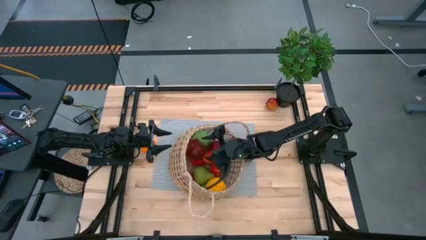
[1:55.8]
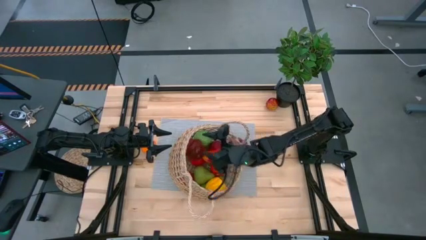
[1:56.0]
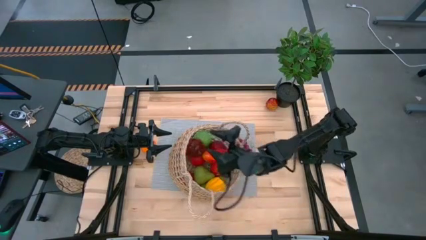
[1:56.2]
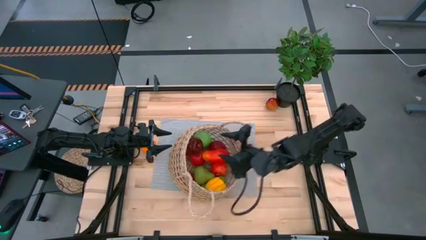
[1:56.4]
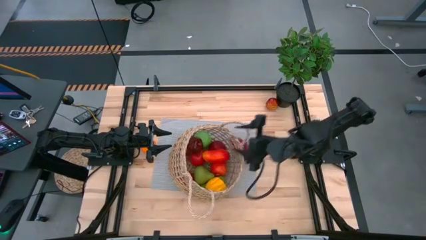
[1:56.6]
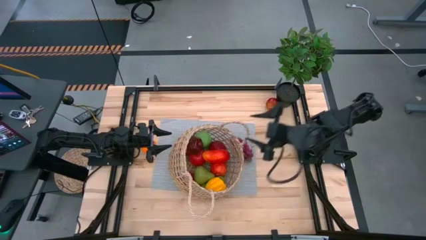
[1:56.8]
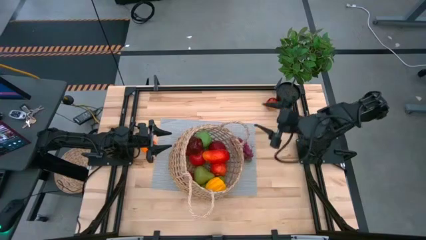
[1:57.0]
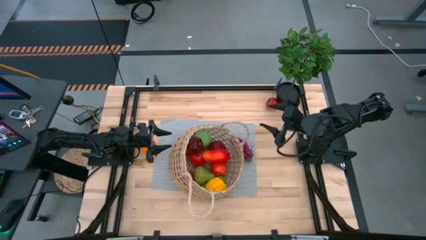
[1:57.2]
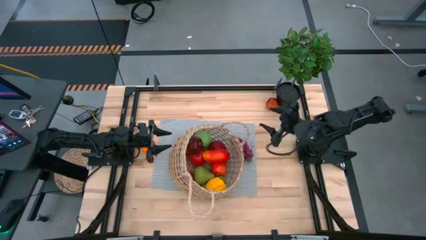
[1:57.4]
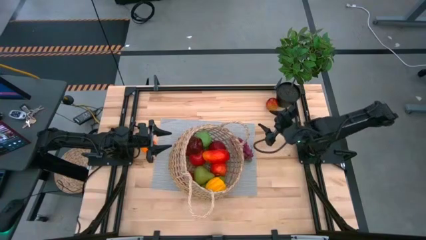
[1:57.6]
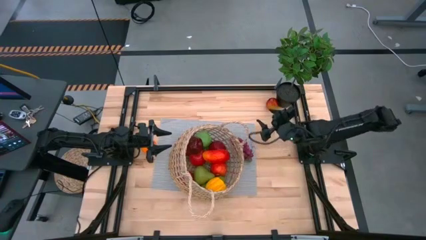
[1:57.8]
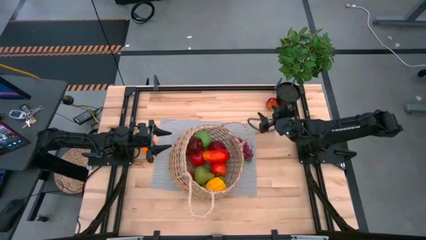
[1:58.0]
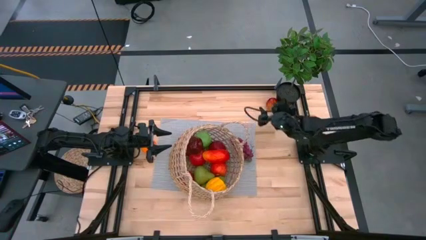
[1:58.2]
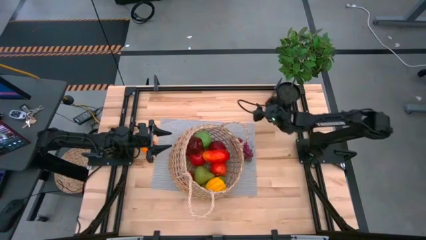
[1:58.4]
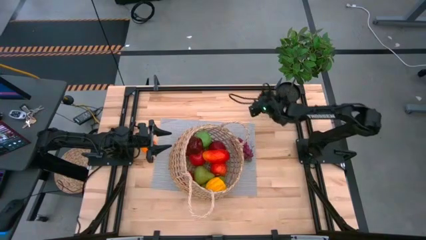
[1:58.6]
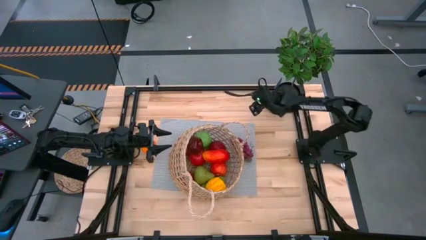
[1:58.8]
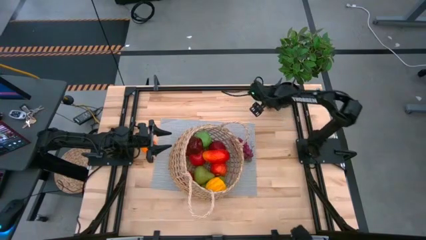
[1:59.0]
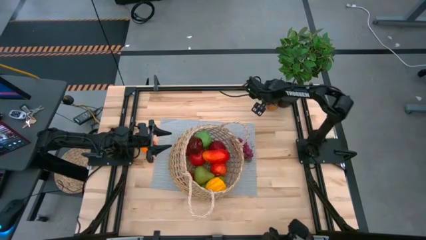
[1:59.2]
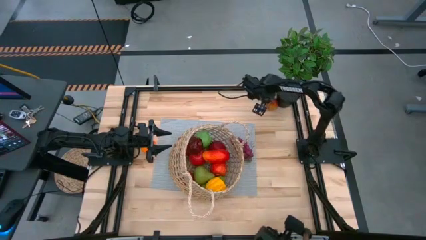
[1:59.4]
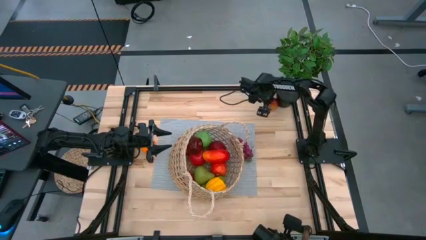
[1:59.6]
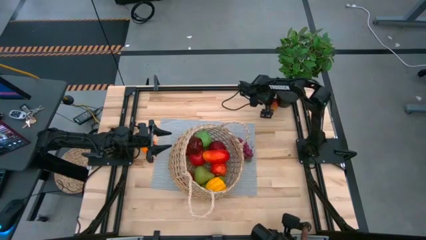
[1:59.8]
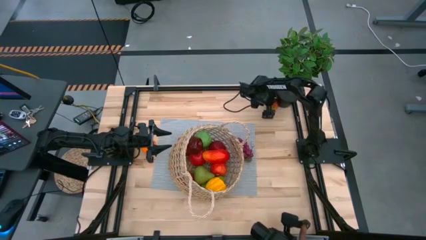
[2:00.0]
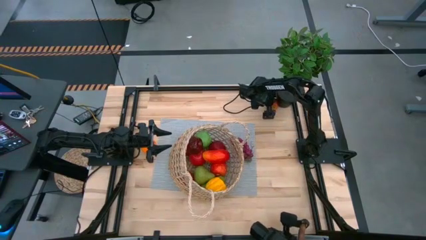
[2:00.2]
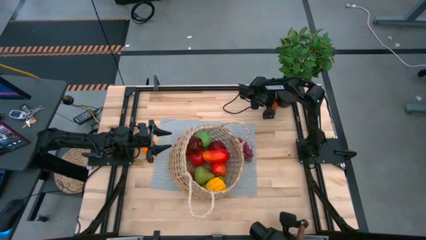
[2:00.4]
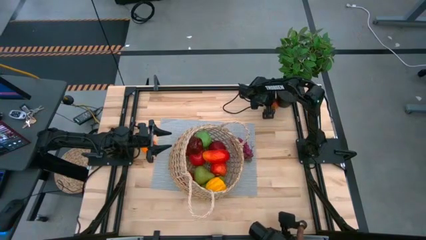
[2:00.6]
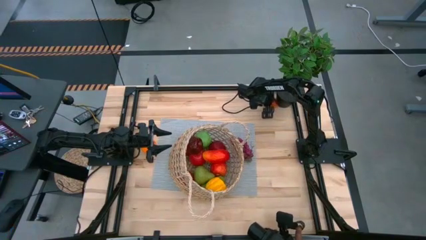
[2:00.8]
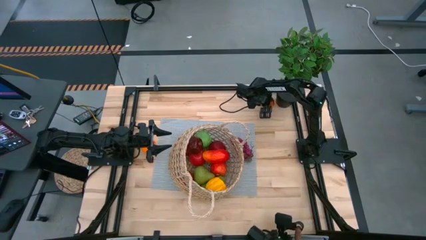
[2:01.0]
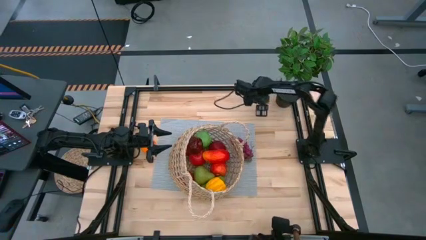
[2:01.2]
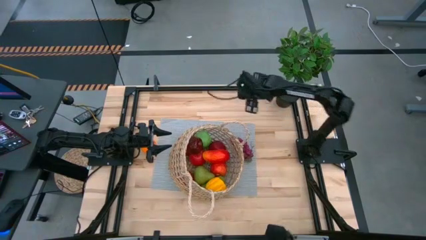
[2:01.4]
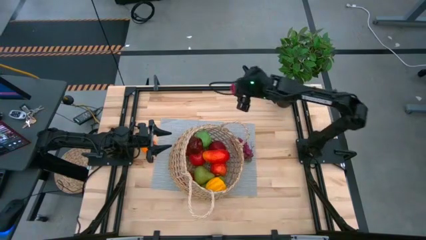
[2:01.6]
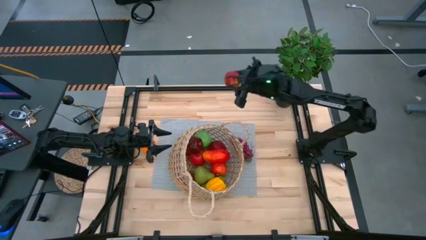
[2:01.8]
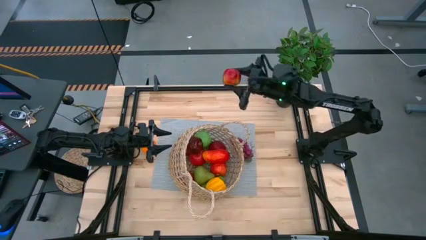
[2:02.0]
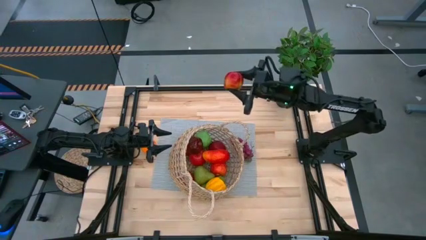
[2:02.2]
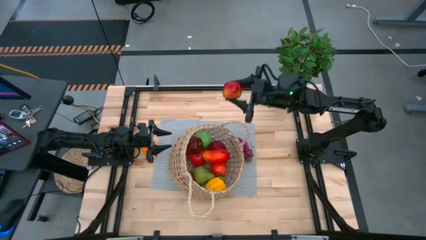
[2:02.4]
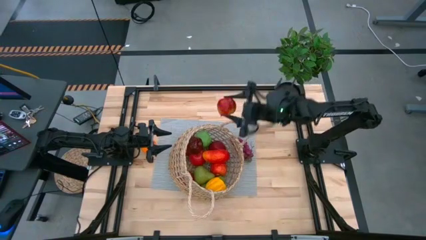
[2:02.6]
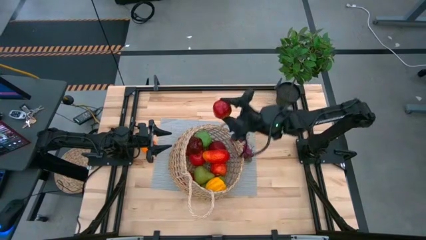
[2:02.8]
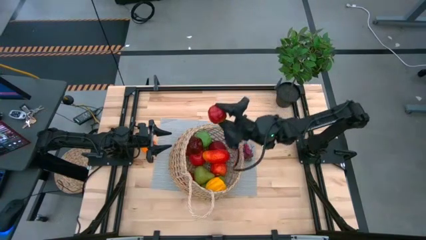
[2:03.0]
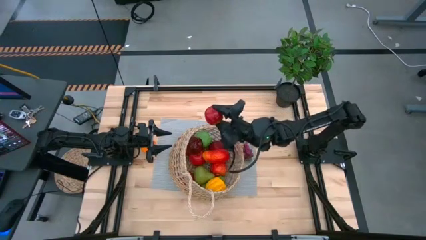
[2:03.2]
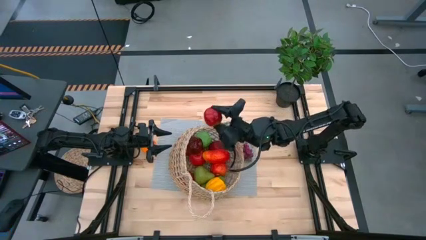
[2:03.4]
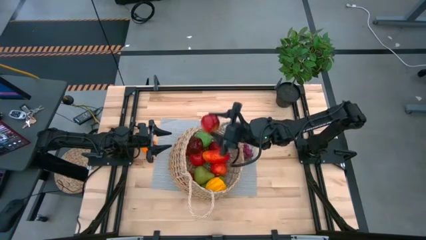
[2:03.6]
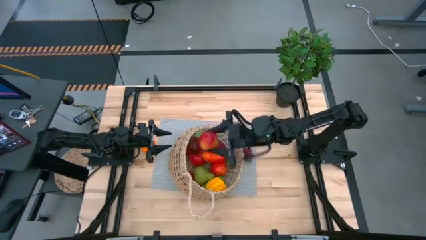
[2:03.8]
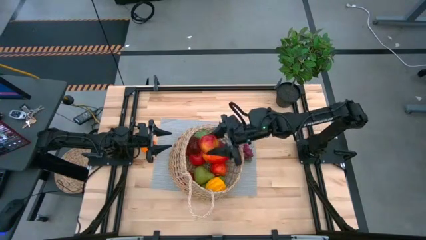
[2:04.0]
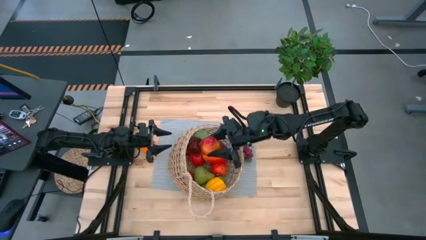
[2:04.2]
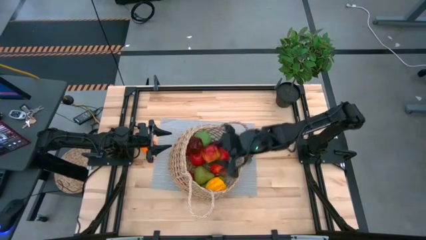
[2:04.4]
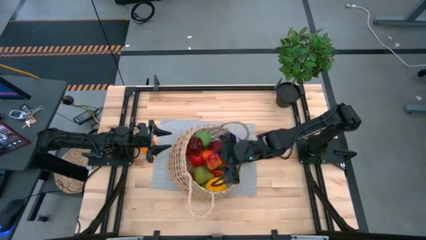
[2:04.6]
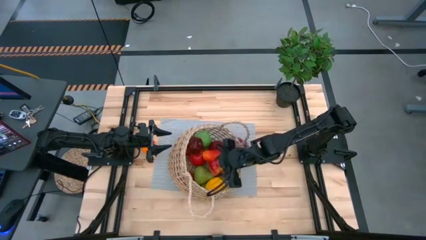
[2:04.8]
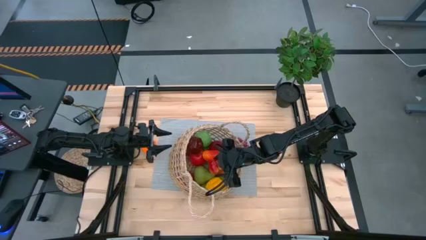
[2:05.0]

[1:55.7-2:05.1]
Task: Build produce basket
Put the apple into the basket

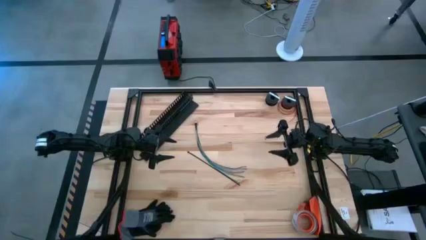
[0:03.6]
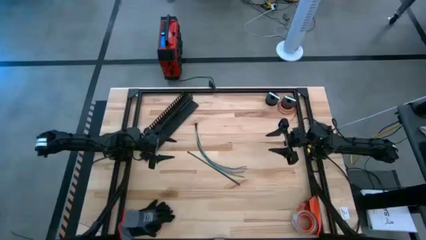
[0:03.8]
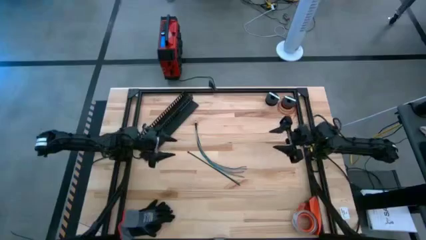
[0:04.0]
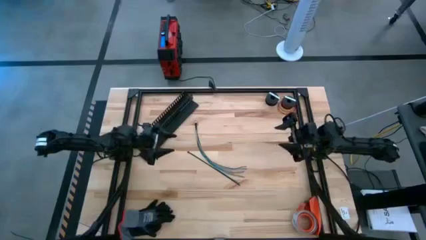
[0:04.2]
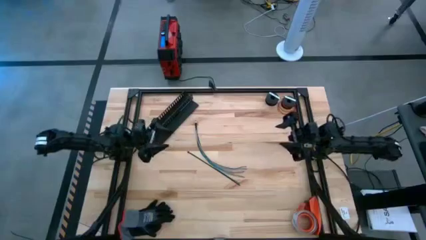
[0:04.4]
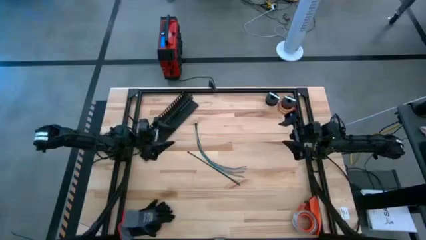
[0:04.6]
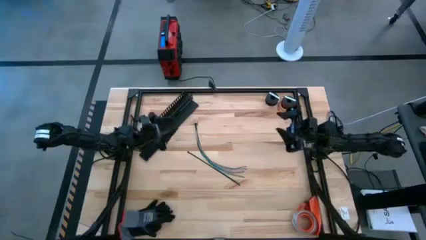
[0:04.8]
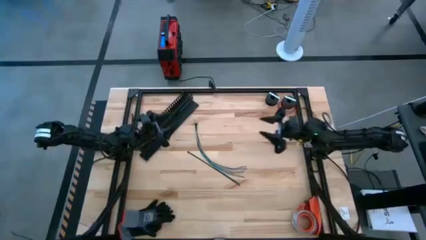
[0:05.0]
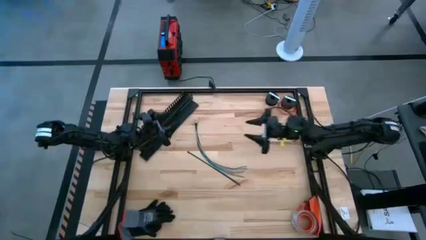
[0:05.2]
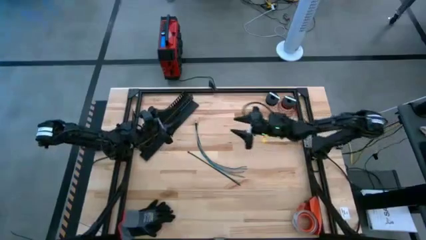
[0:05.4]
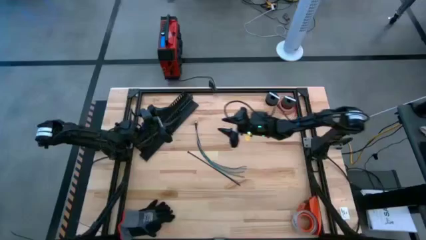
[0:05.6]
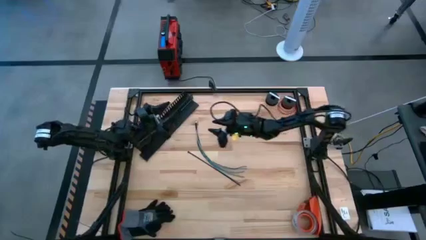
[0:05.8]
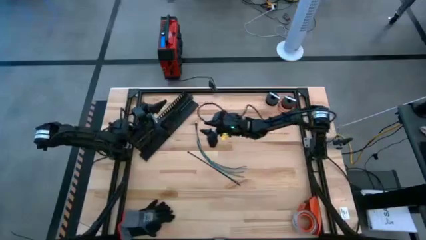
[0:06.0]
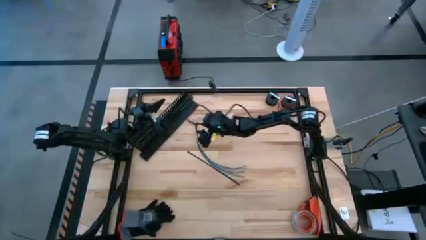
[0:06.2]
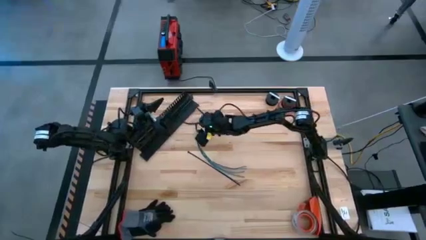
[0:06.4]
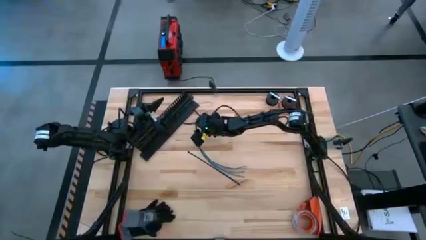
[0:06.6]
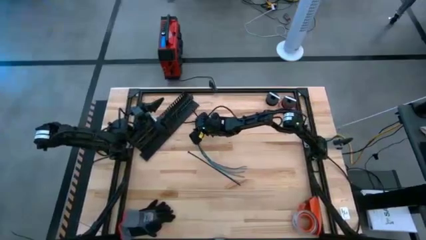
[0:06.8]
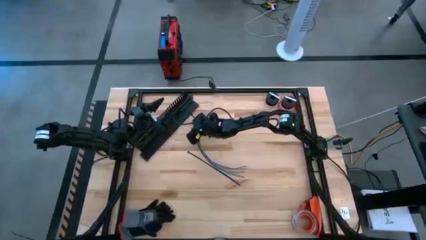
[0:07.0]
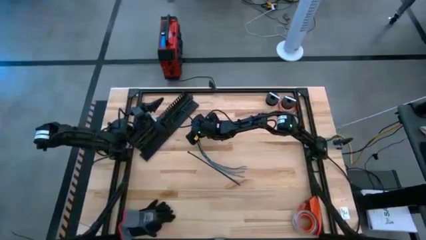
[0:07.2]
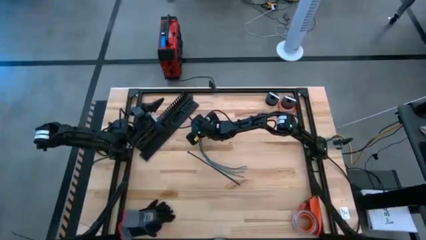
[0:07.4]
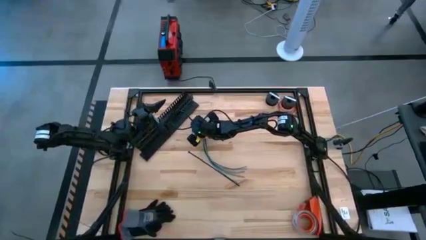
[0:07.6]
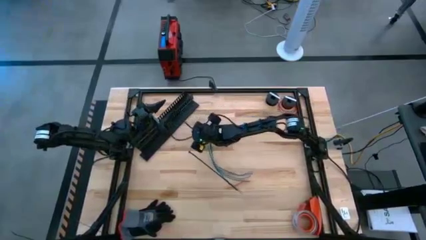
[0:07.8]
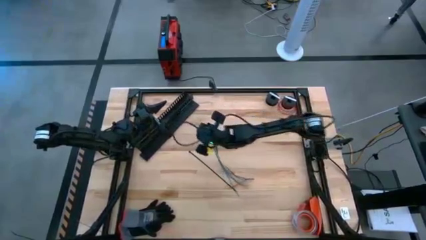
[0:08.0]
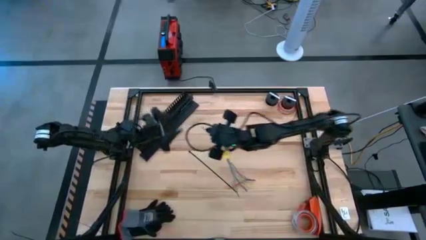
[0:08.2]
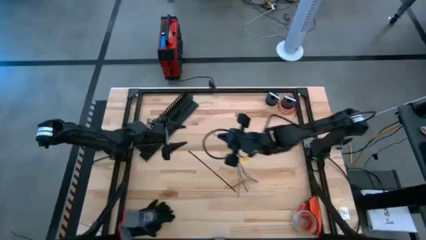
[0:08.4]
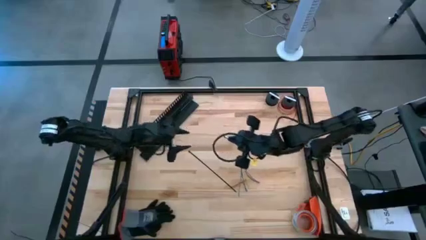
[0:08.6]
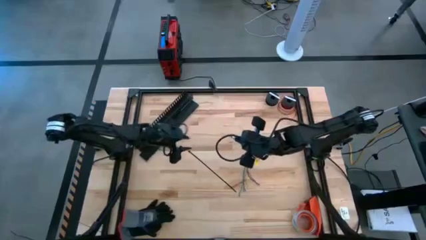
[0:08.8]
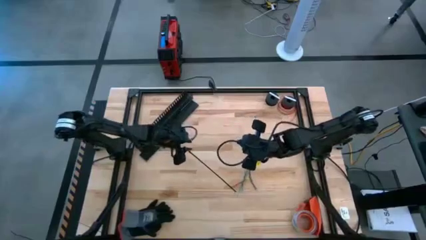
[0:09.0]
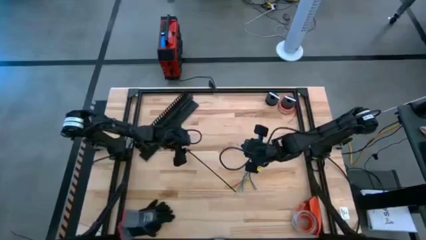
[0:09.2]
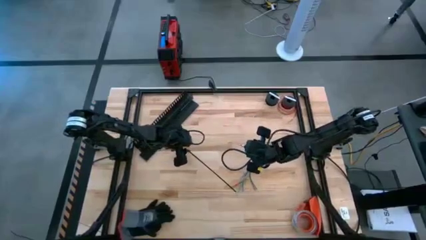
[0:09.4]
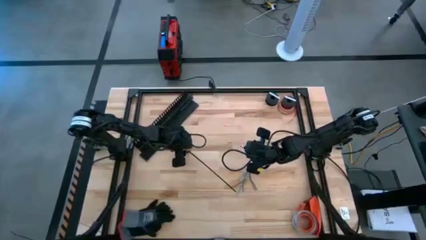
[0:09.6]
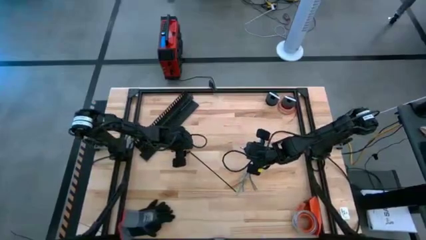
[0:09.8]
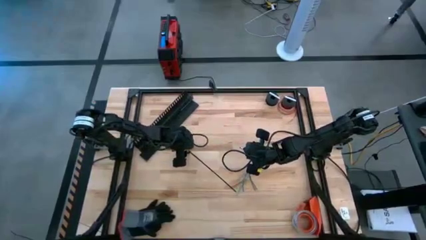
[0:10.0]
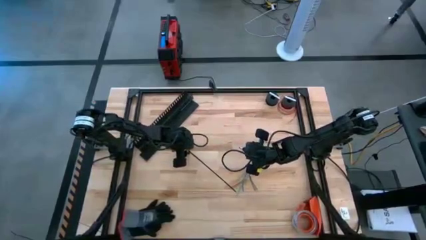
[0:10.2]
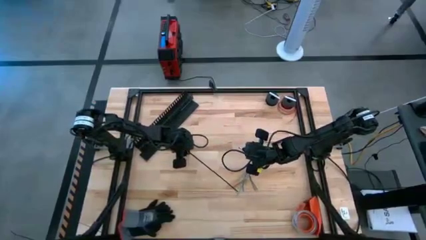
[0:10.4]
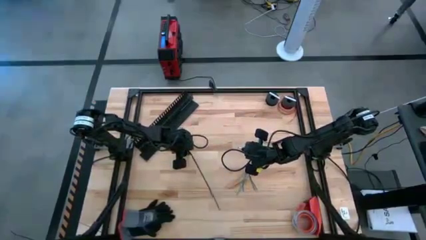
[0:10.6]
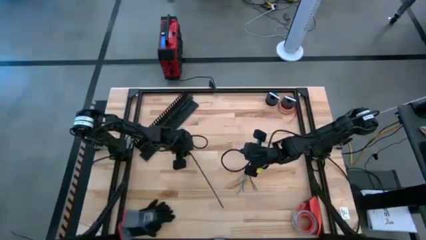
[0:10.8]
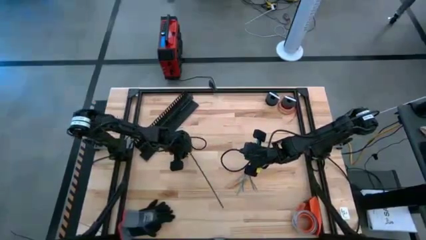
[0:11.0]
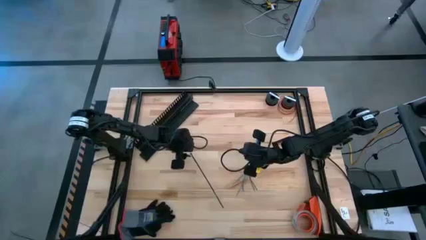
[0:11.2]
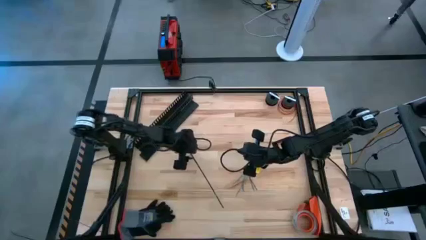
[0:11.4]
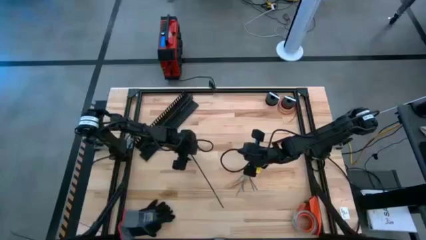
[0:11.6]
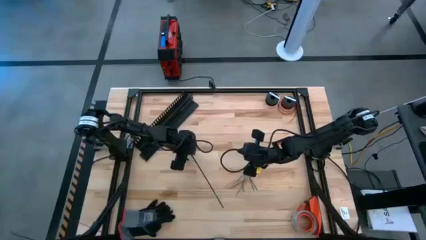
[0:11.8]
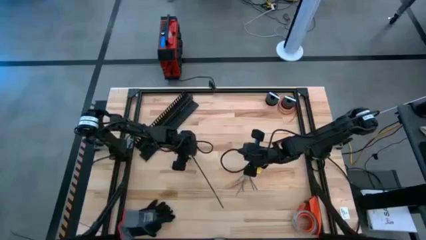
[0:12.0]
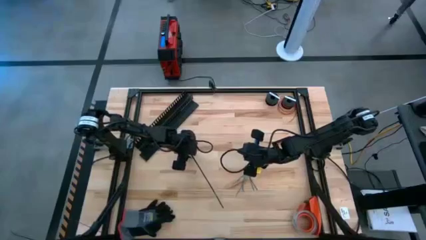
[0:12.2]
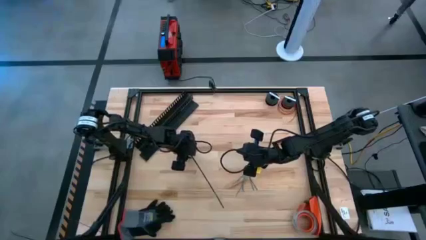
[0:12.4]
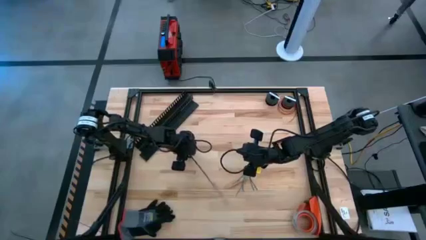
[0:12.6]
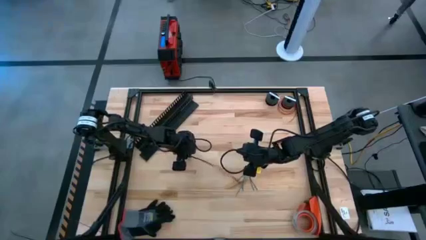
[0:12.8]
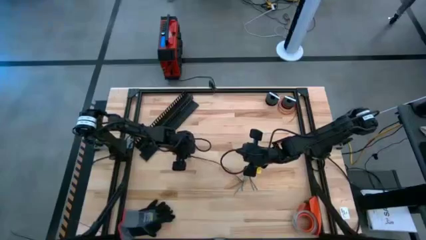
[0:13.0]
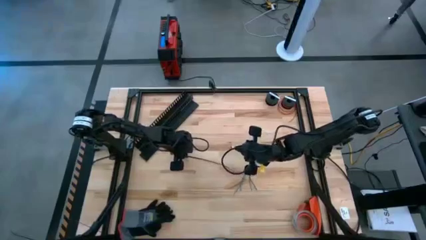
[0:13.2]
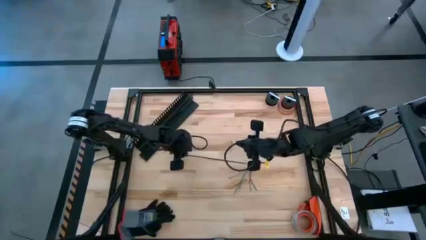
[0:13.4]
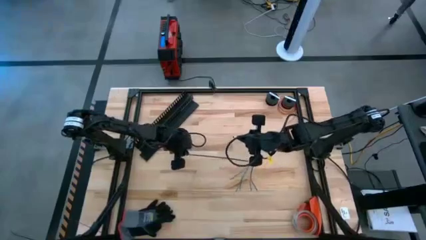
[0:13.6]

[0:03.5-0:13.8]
Task: Ziptie cables
Wrap the cable wires together using a black zip tie
